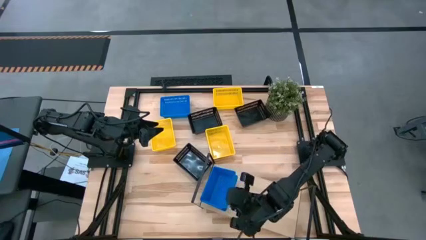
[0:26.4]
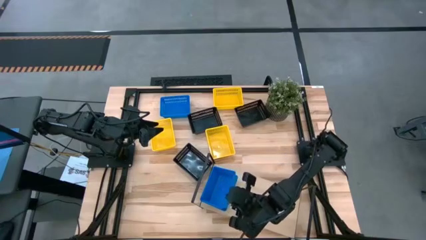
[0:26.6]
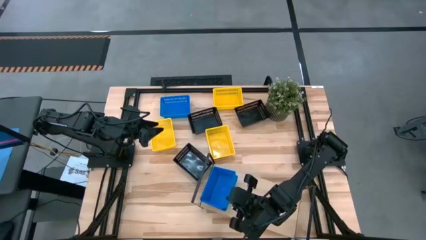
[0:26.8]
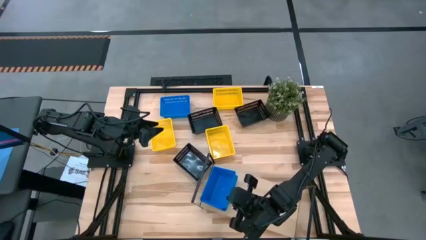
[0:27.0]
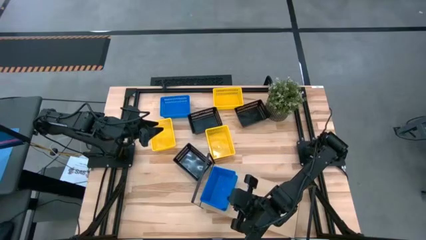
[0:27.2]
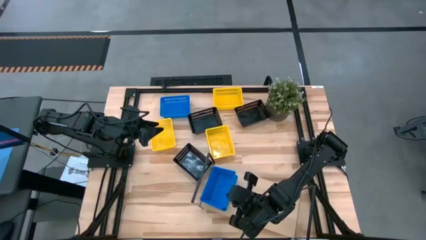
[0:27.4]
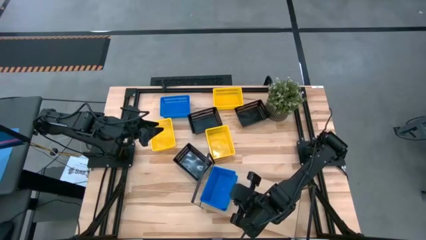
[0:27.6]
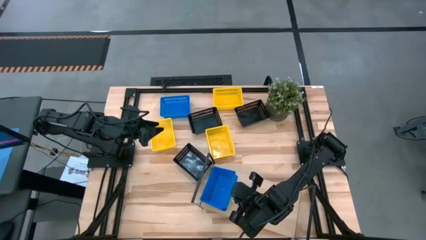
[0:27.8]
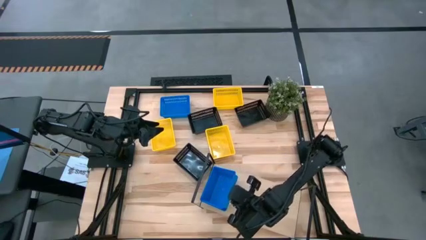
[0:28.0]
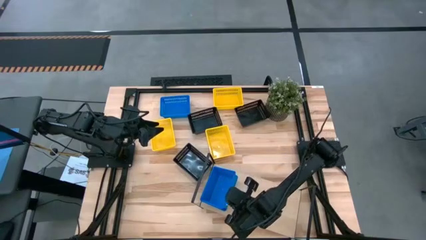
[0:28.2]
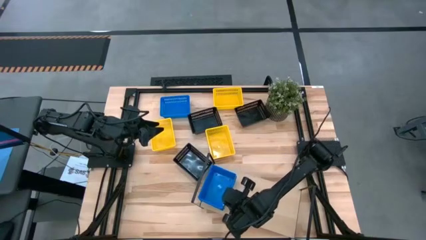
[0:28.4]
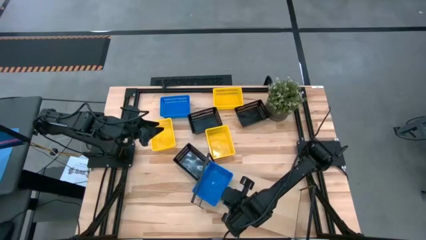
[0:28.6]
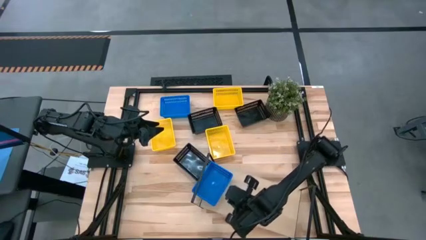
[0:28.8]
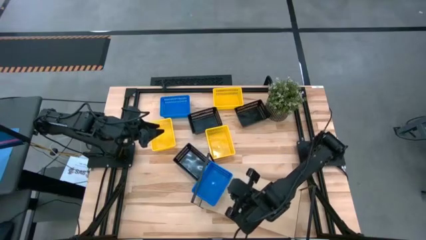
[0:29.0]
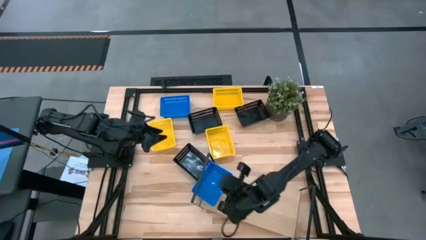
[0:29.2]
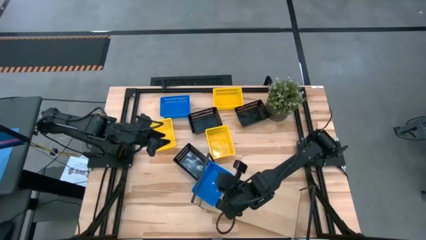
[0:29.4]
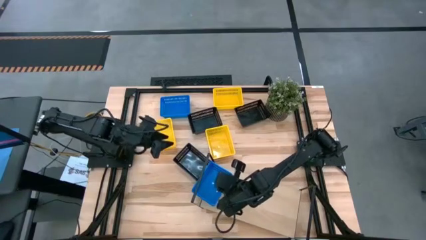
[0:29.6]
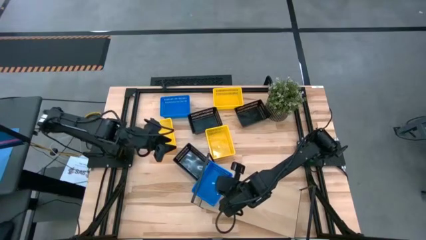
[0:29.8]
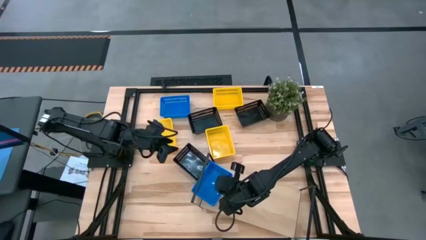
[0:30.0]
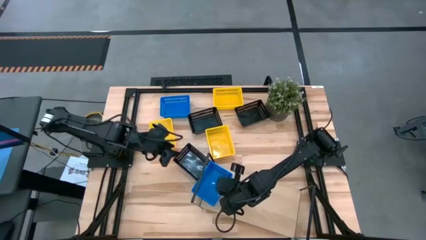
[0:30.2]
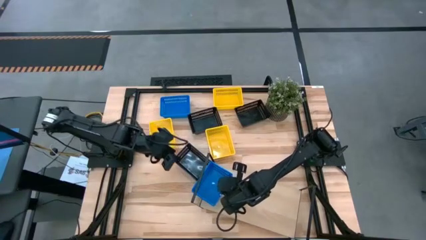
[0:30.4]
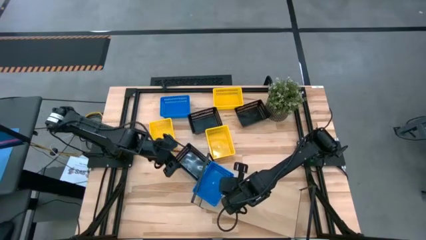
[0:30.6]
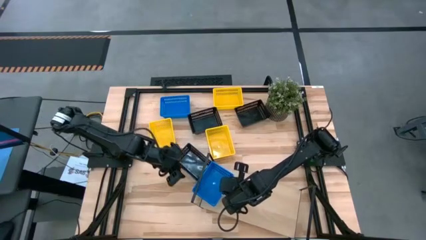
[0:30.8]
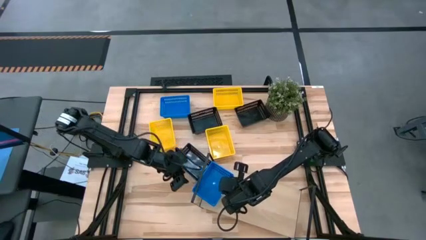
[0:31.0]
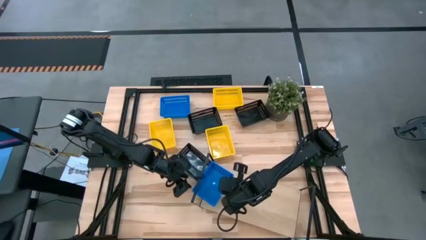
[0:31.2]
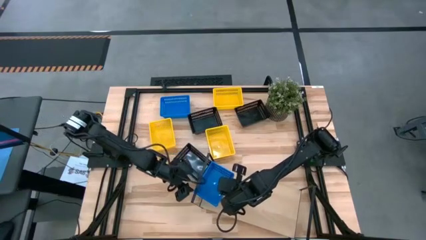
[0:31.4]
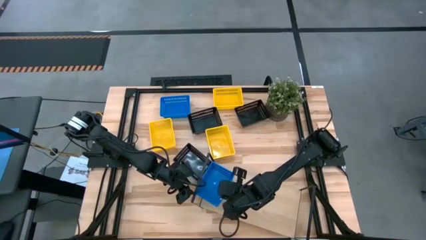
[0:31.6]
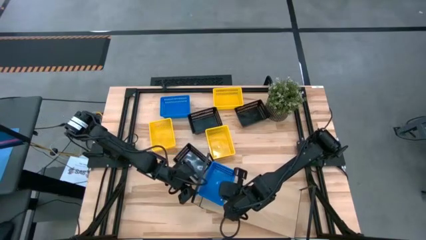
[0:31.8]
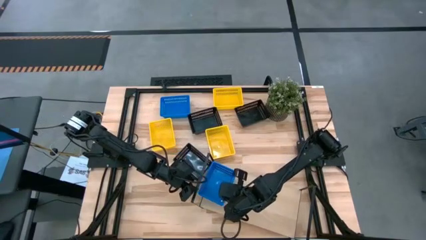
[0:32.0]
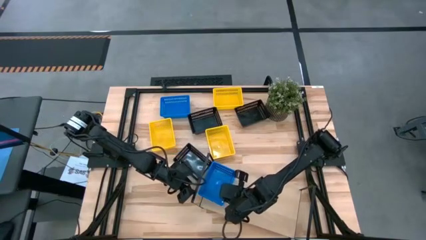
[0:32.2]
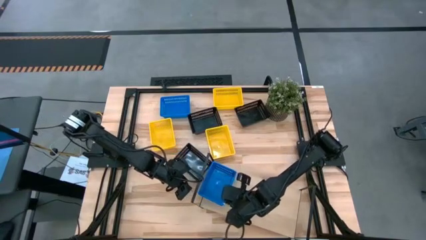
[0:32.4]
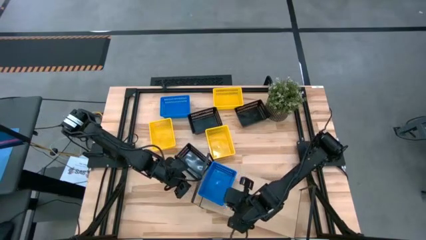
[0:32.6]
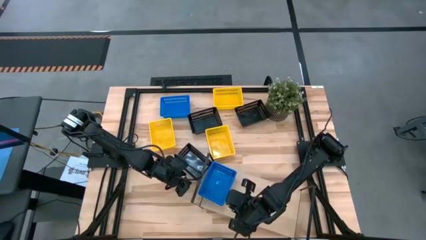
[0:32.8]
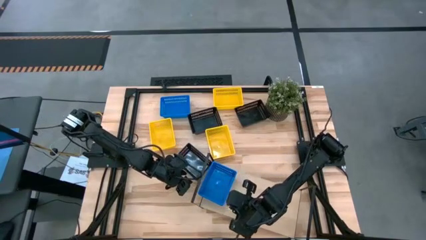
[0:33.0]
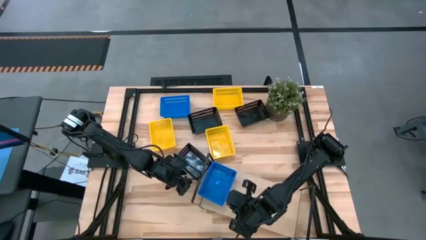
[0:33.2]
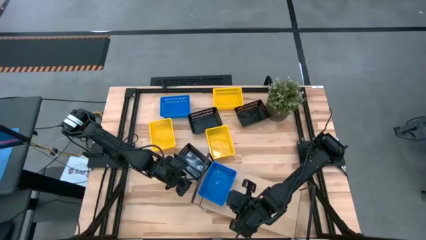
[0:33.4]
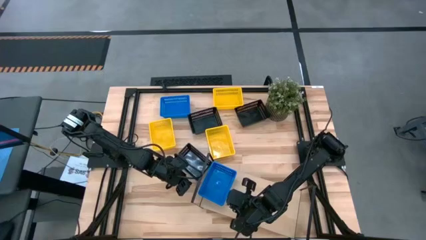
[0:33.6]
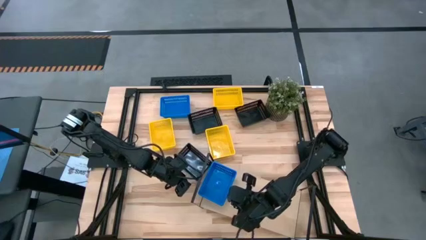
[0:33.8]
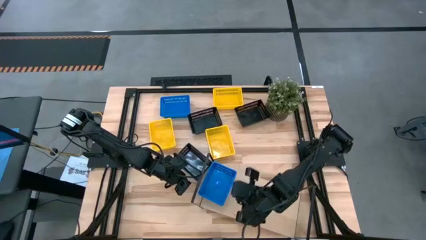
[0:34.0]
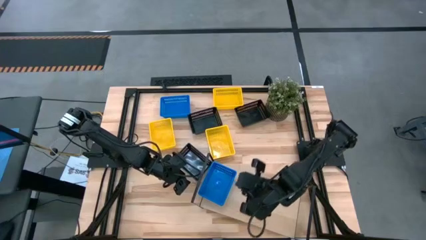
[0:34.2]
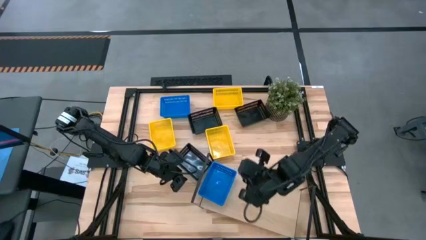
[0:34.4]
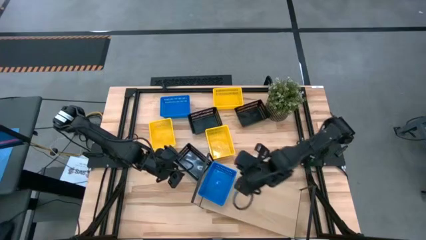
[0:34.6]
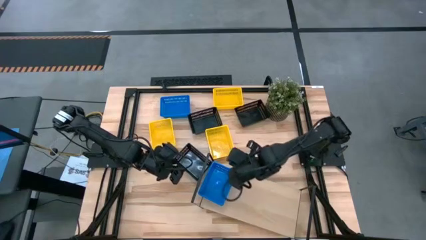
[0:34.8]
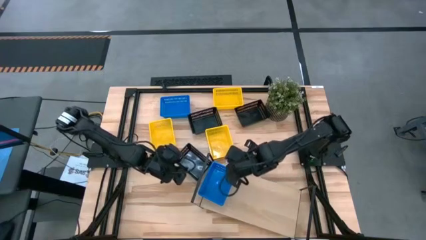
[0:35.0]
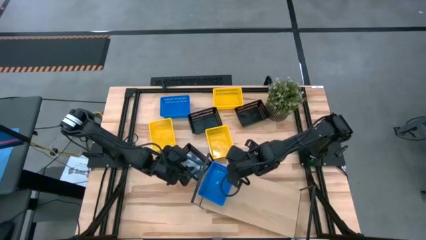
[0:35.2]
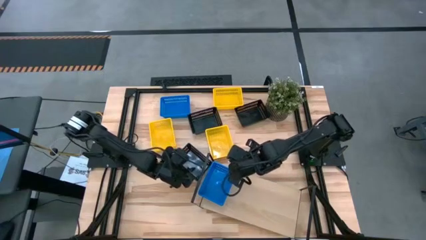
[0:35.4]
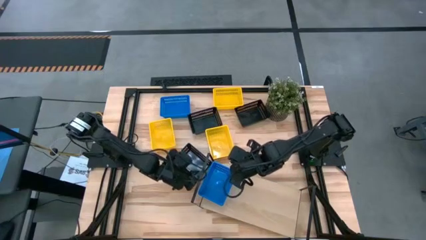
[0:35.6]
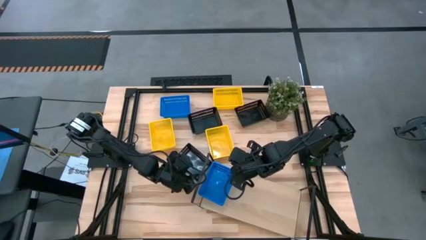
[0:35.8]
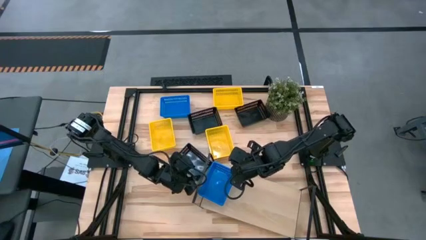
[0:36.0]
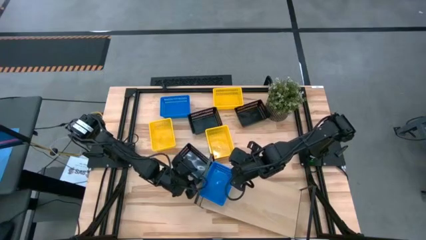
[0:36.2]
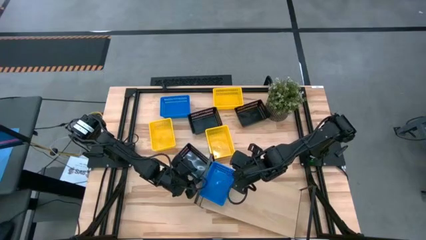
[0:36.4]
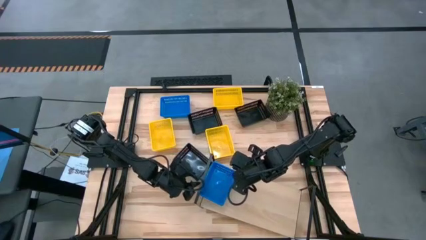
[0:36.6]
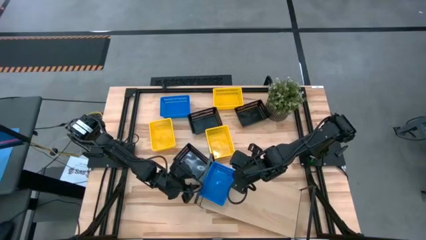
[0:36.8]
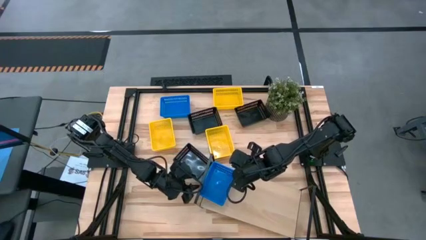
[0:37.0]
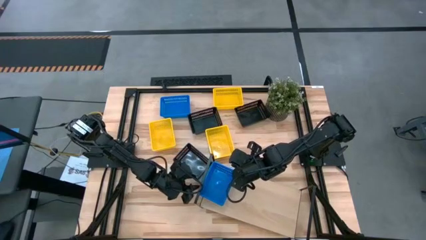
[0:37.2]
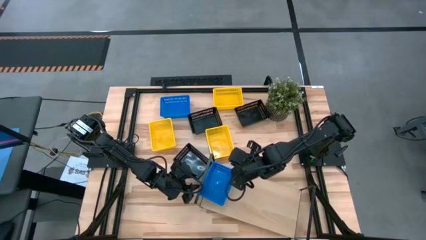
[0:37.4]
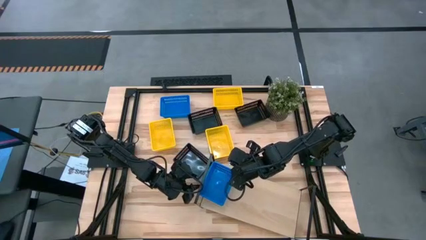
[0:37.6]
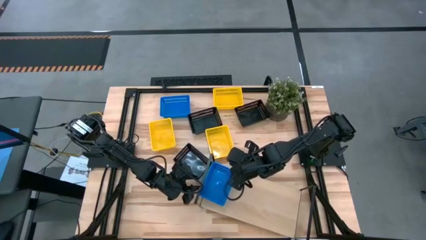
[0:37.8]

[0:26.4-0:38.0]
Task: Stack baskets on shelf by color
Stack the right blue bin on top of the blue bin on the shelf

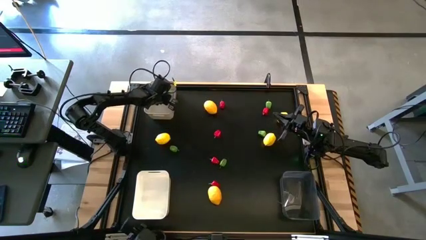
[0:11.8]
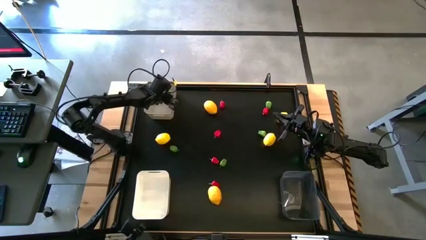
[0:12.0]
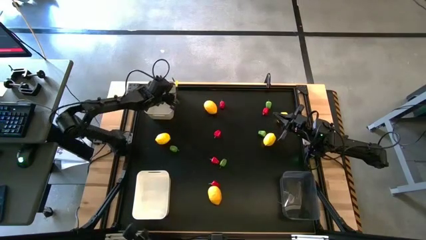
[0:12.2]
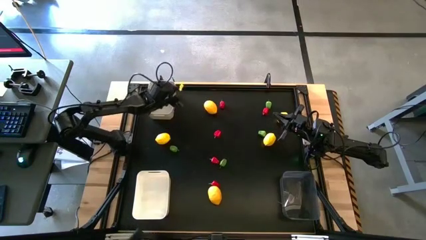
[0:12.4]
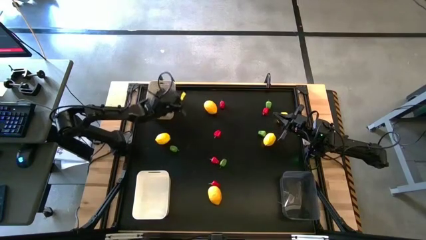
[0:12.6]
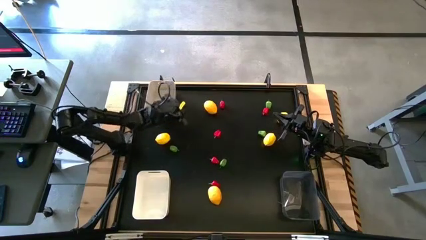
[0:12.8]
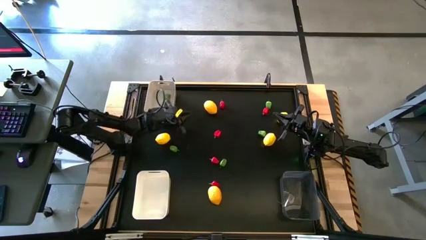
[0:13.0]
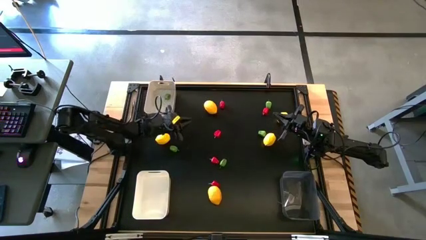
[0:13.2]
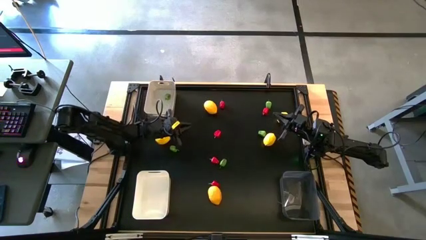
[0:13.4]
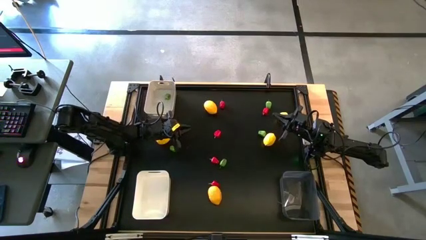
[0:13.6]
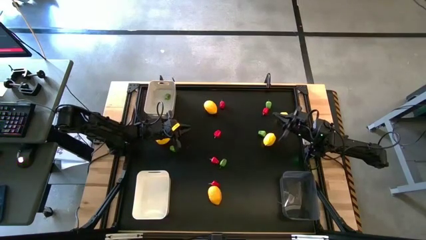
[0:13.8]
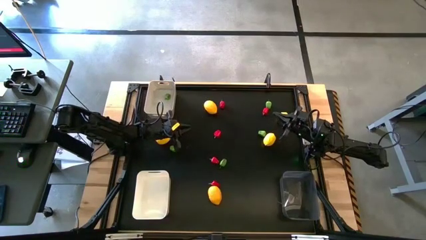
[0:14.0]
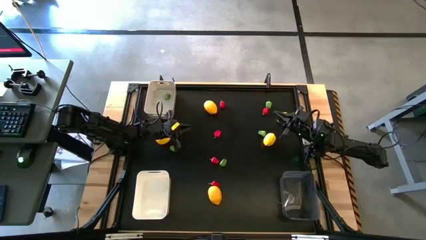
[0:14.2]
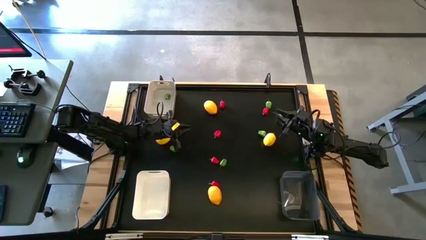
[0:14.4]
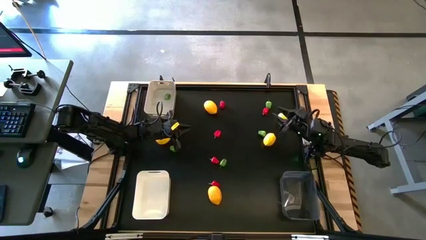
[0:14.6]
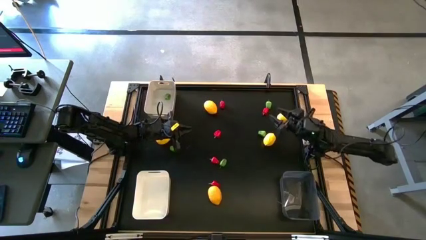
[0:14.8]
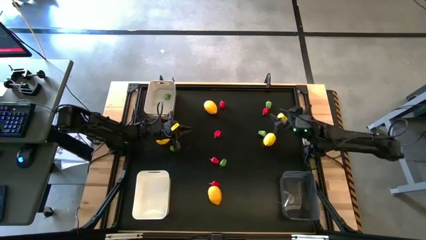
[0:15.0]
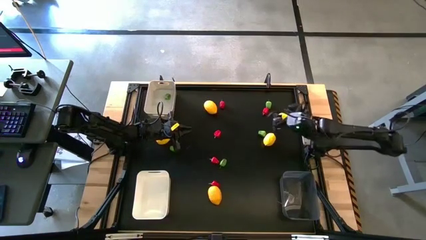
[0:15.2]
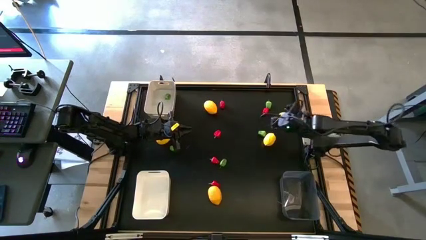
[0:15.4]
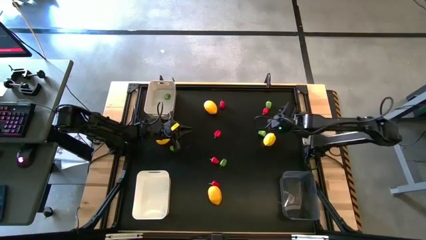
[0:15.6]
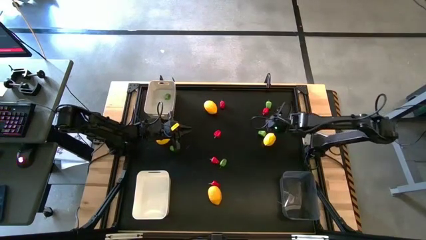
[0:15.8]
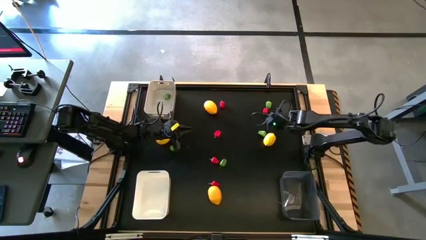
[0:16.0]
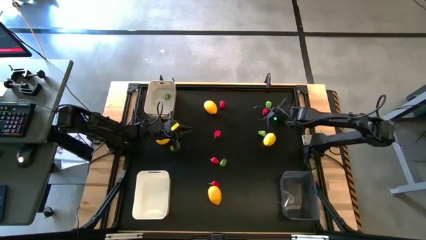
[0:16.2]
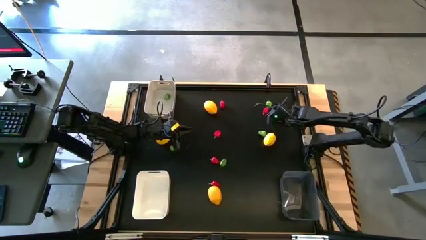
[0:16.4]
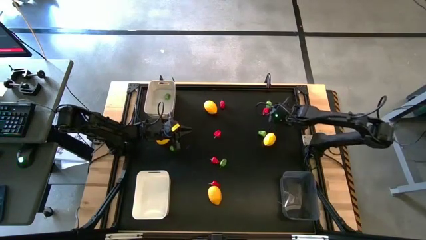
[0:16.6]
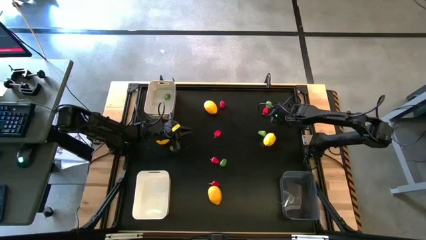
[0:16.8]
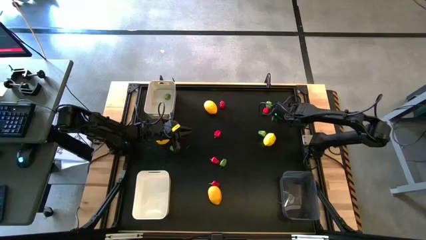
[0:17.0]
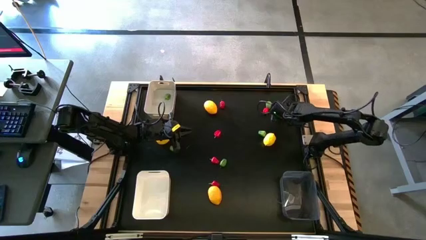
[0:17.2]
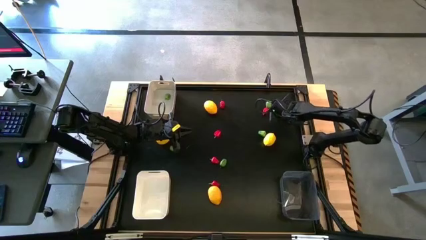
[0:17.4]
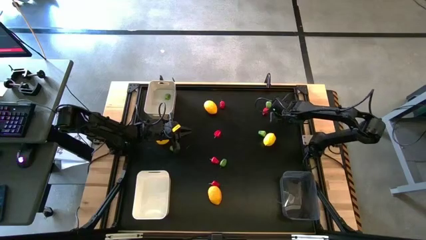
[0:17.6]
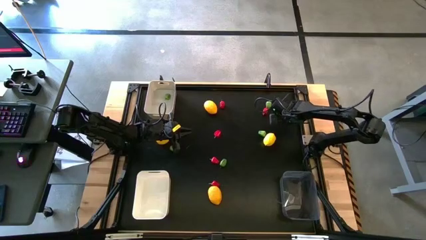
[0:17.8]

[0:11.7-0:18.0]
Task: Sort produce into baskets
Put the yellow lemon into the white bin
